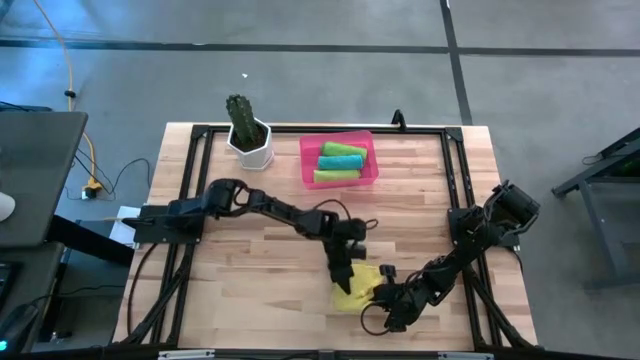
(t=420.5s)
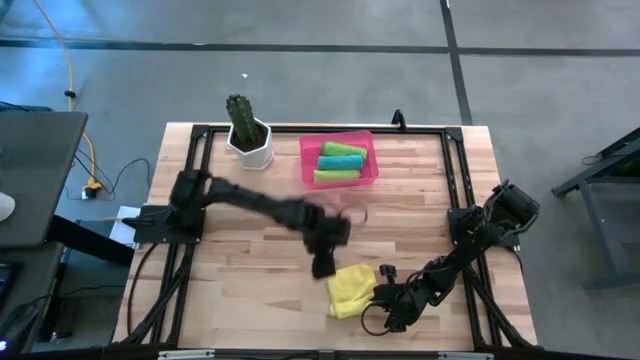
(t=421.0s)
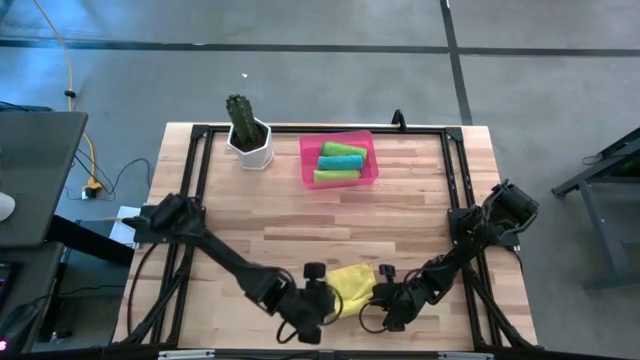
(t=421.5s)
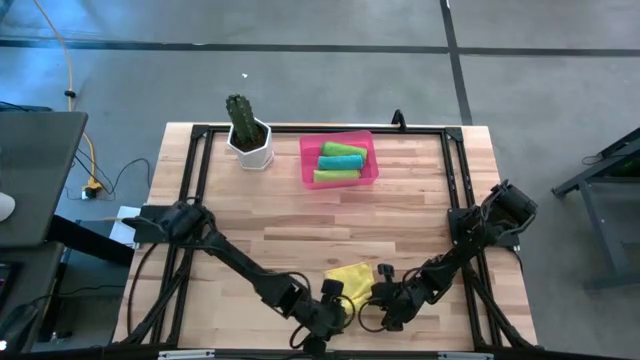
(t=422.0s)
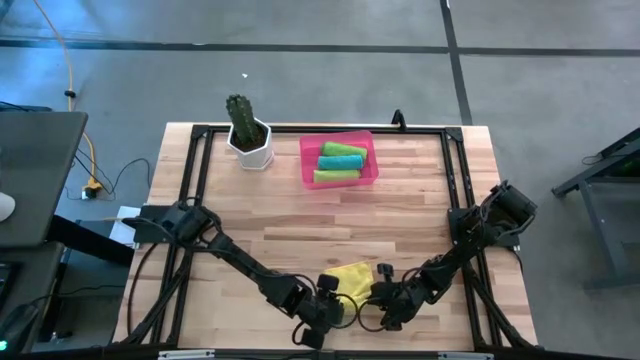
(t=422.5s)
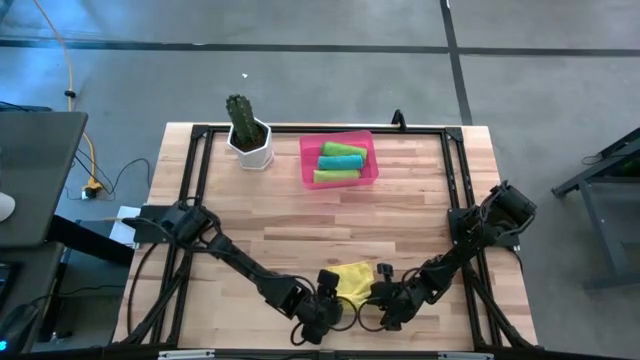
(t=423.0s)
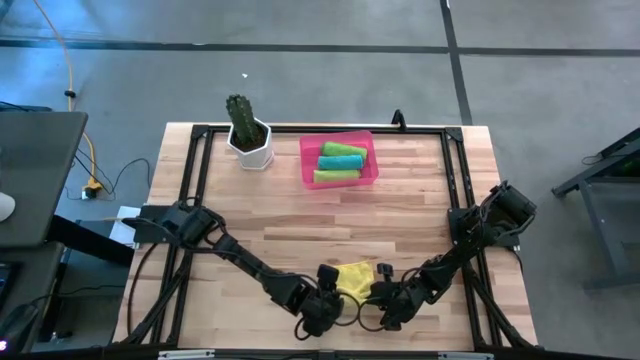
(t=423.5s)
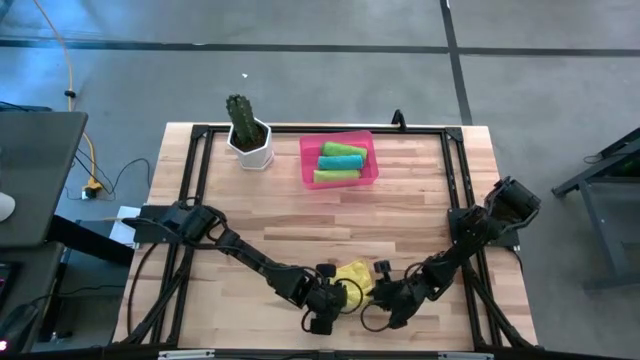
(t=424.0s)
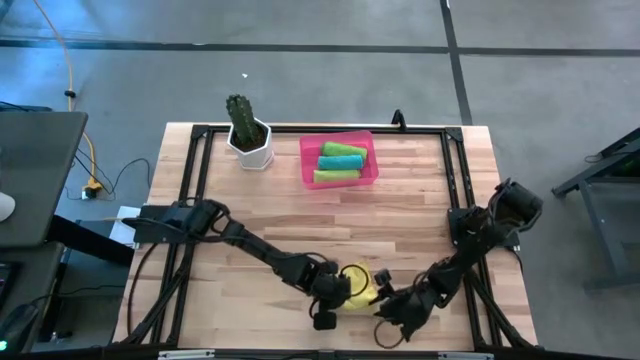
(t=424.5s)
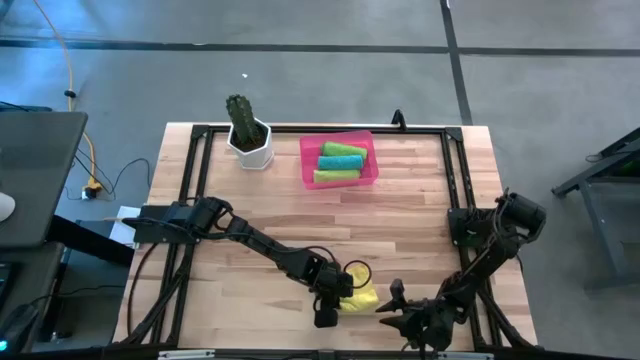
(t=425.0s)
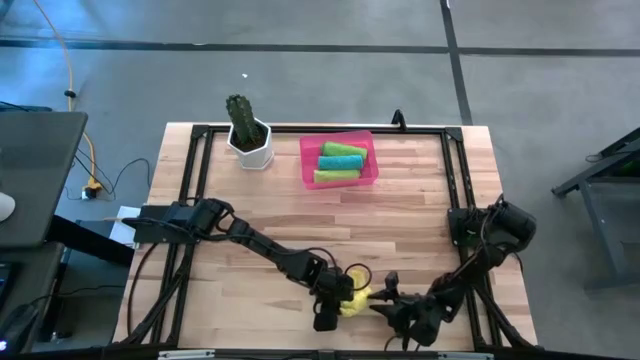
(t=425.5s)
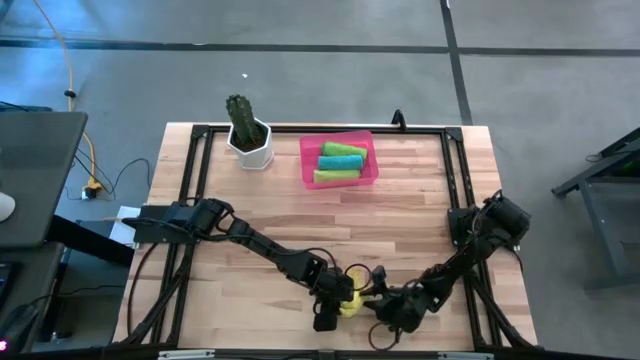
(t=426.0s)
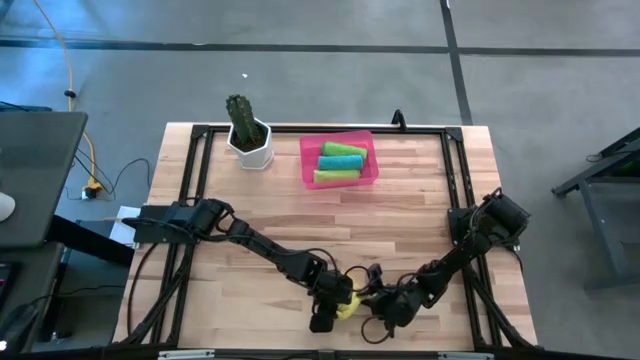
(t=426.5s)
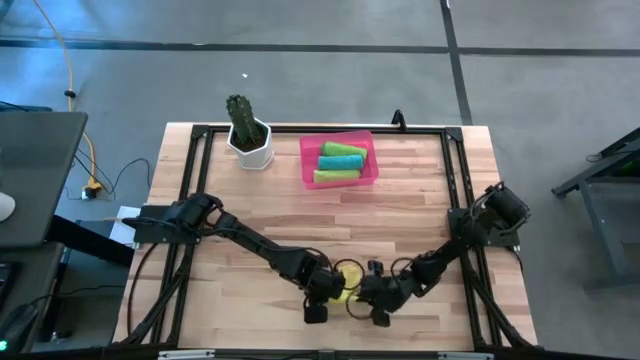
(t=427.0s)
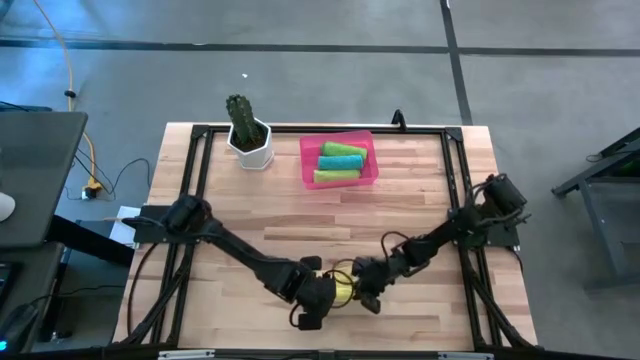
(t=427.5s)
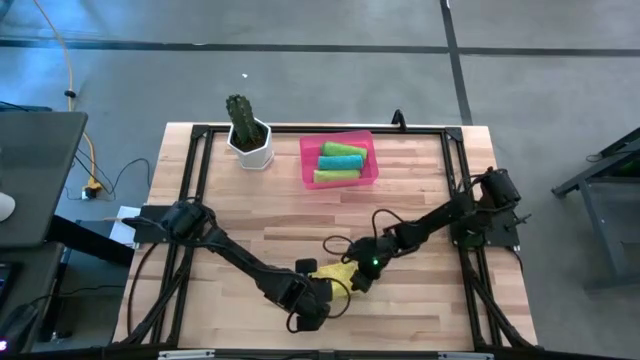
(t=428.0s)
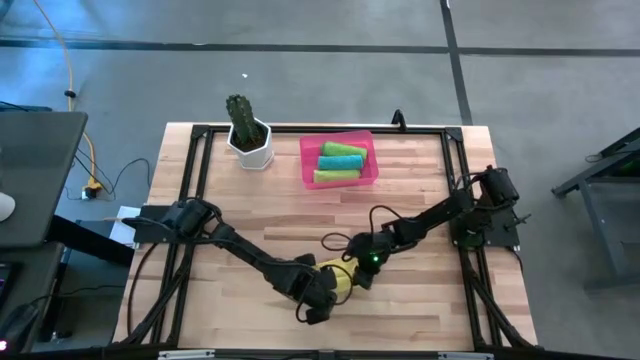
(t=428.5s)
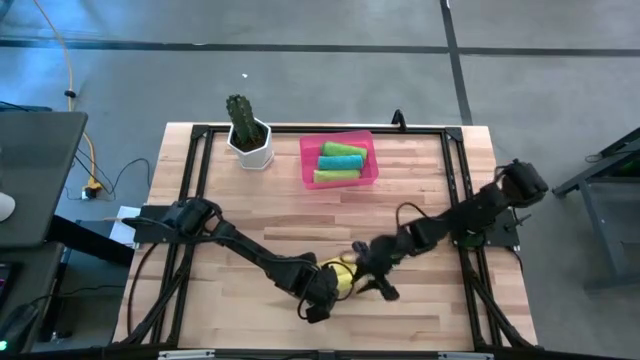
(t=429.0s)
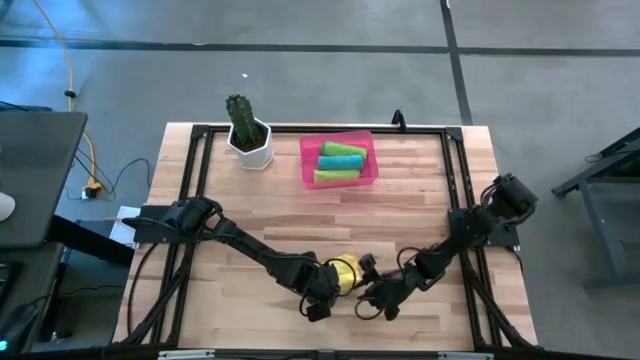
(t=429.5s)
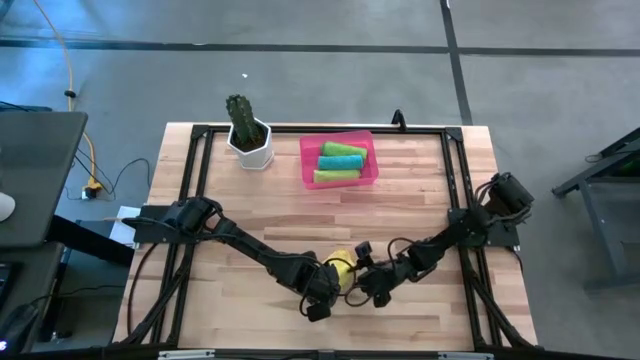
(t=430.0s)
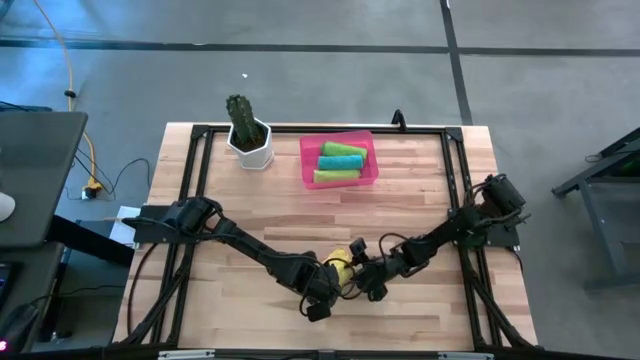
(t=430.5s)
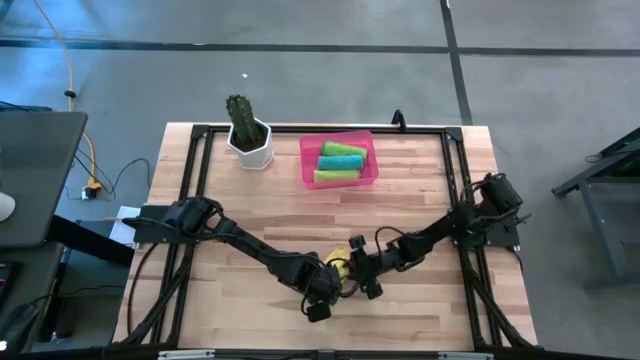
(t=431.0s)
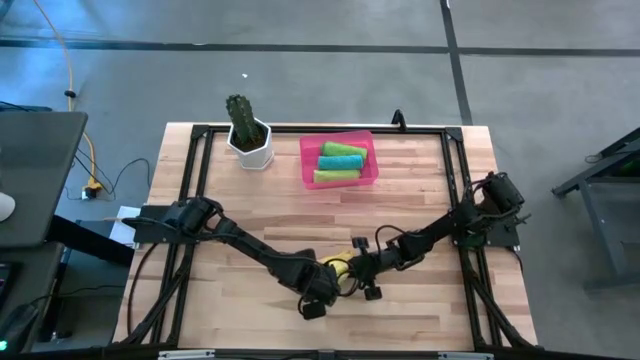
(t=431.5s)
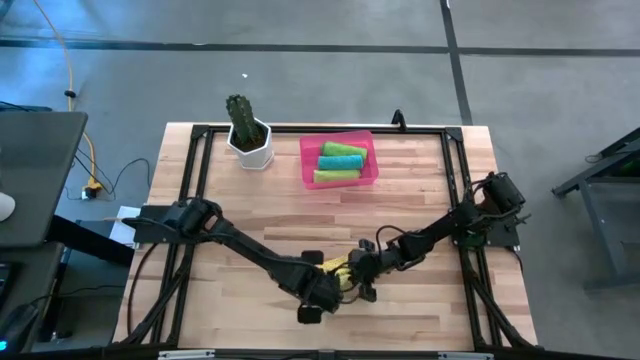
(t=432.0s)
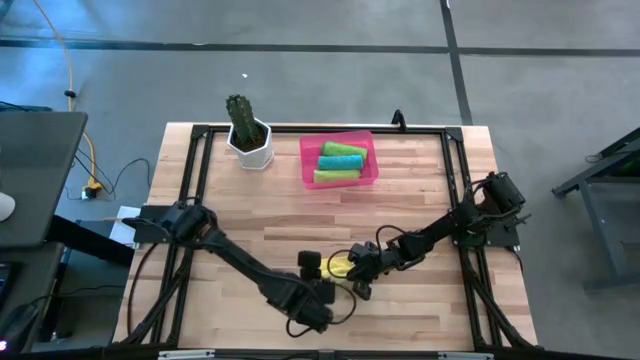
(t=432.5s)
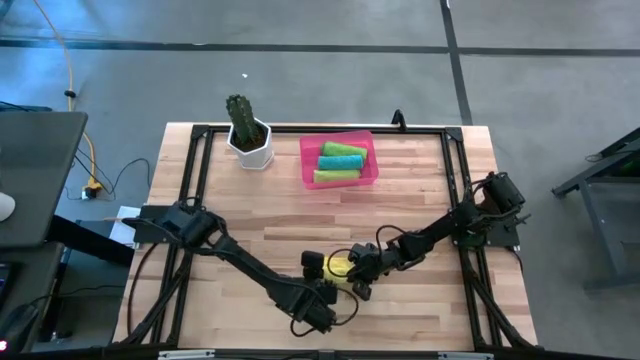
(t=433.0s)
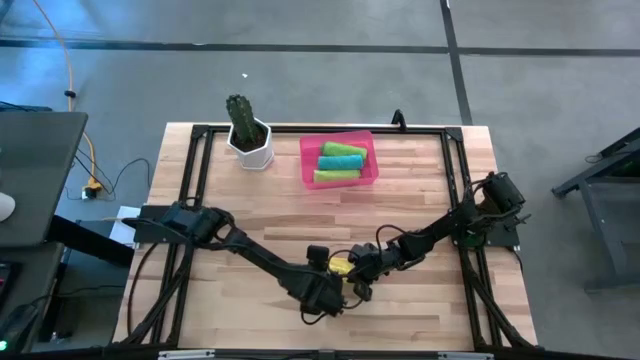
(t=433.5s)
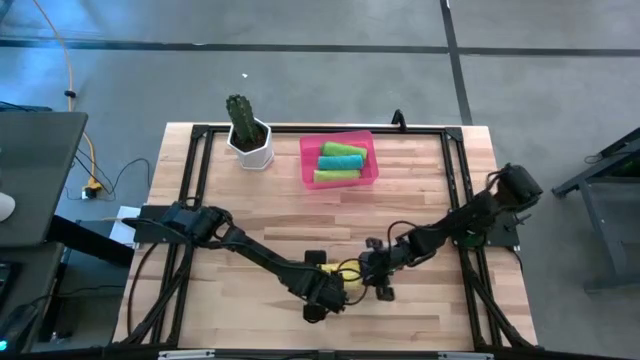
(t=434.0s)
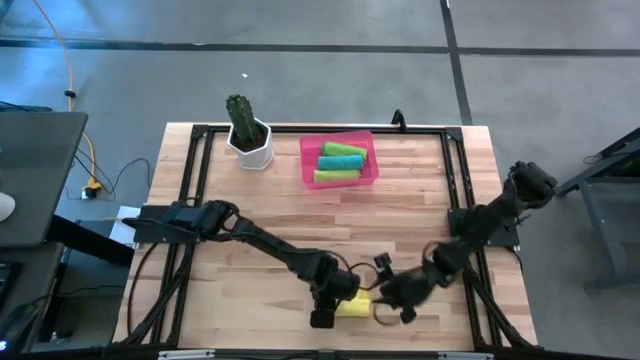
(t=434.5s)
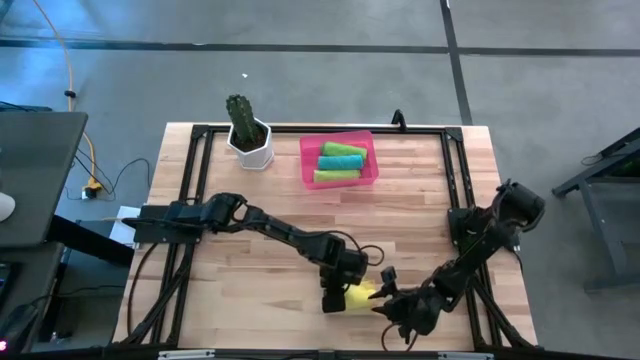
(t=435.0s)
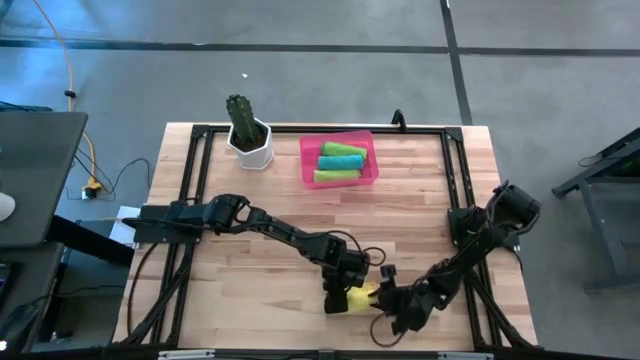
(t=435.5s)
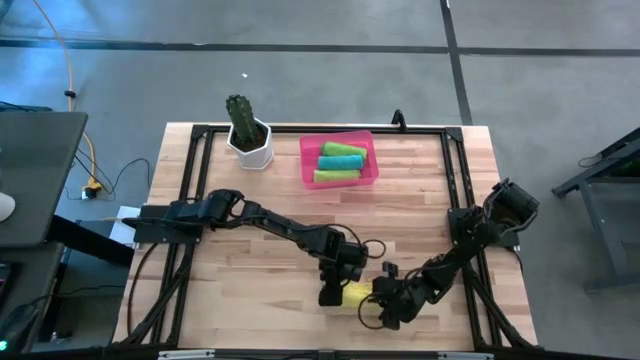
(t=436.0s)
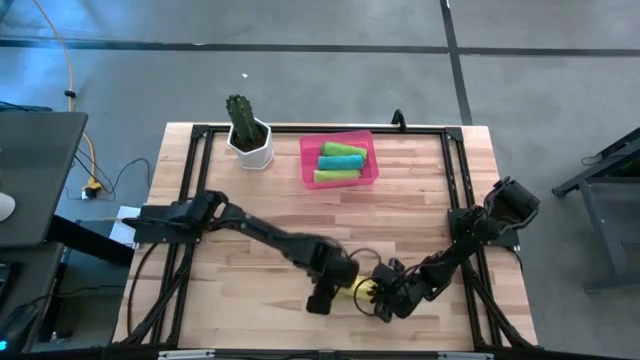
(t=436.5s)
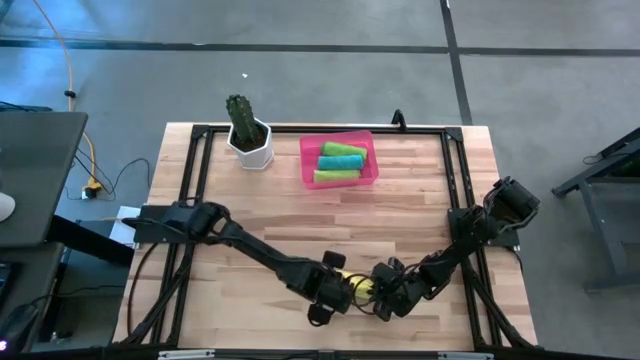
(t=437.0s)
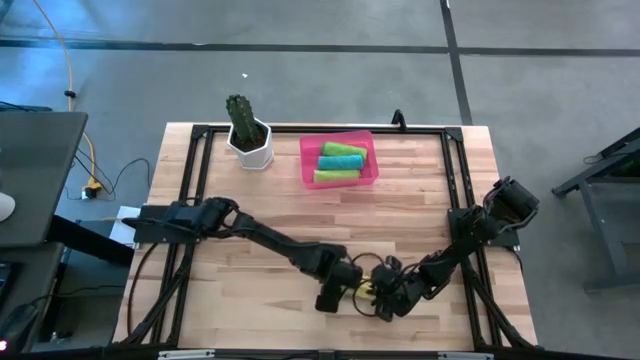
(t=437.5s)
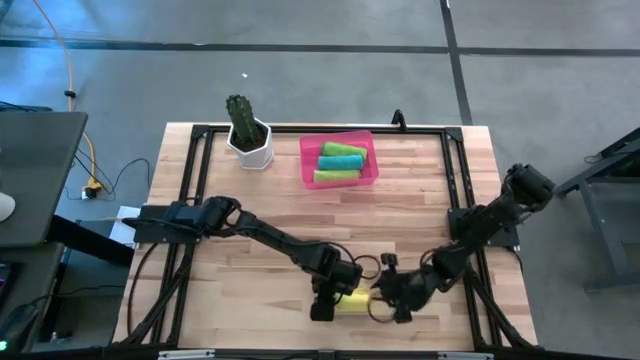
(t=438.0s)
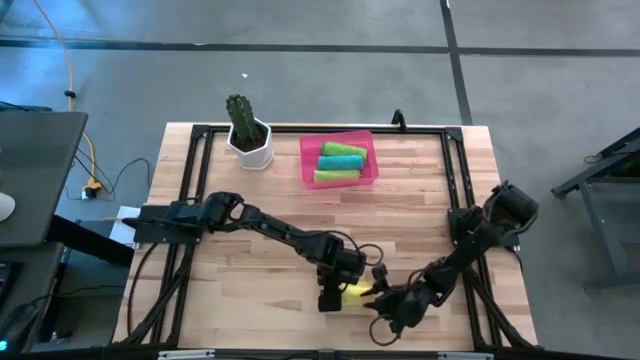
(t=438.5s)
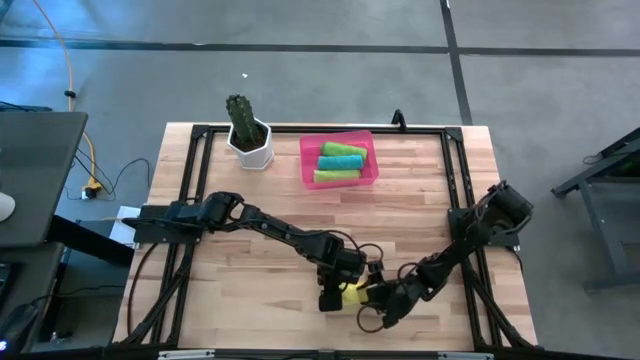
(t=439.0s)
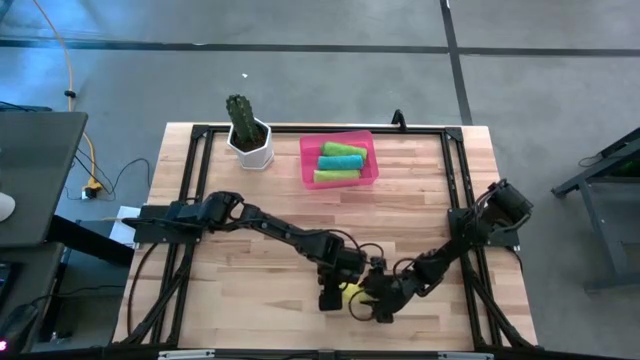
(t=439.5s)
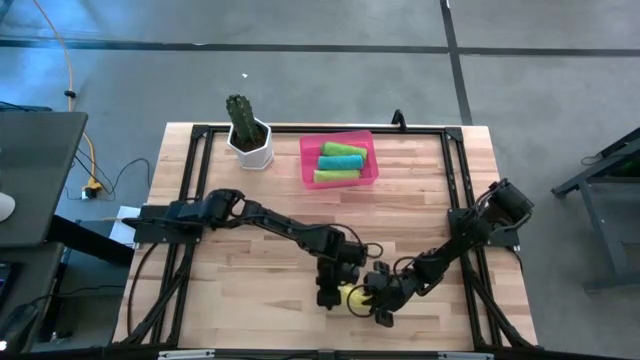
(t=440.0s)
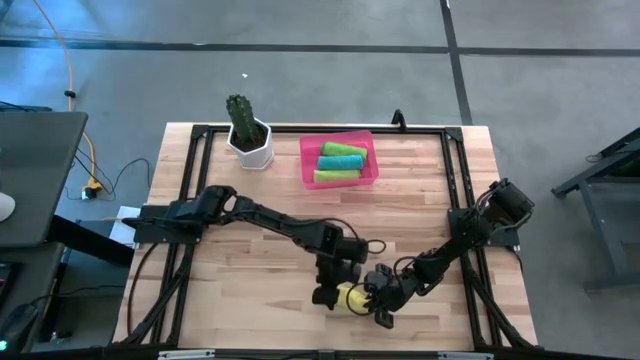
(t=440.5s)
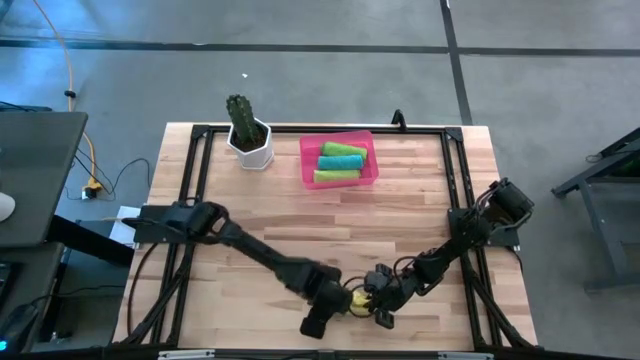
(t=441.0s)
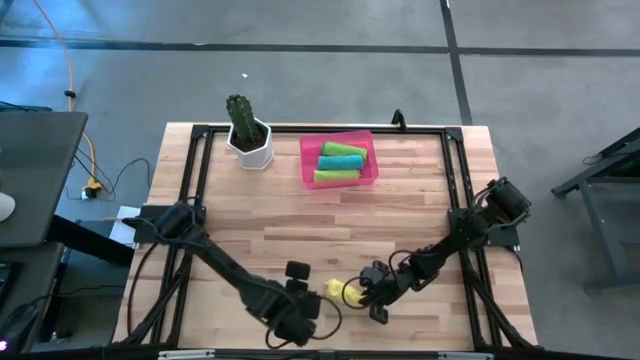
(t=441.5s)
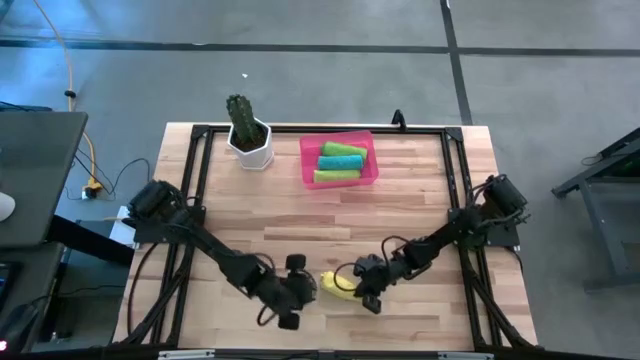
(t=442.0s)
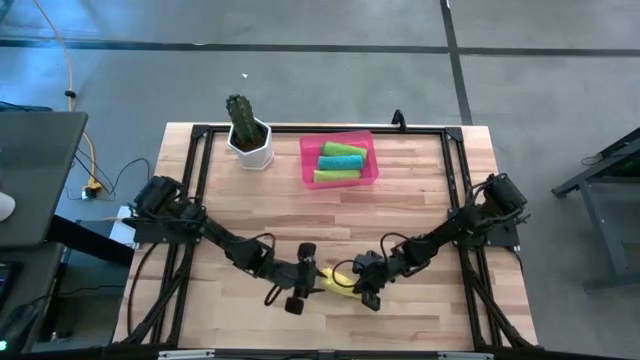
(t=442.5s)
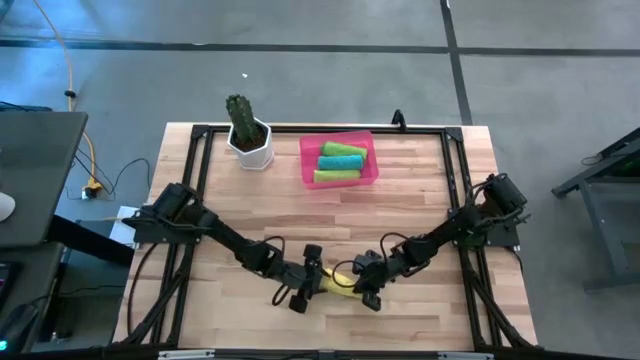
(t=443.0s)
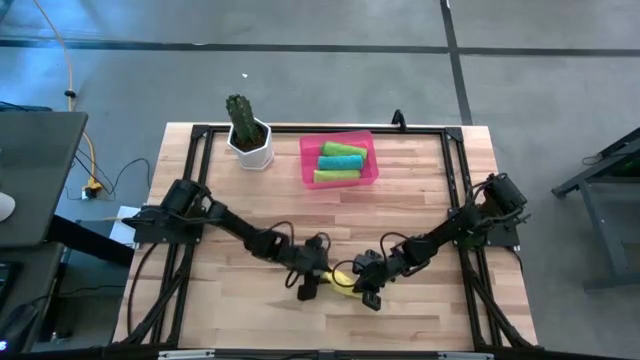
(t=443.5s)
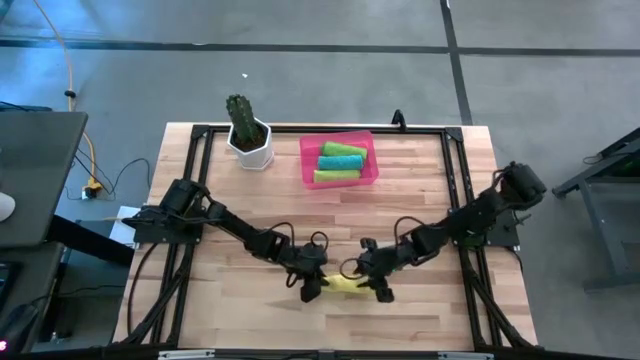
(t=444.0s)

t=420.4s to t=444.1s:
Task: Roll microfiber towels into tight, uniform cylinder then place into a basket
Roll the yellow microfiber cloth
